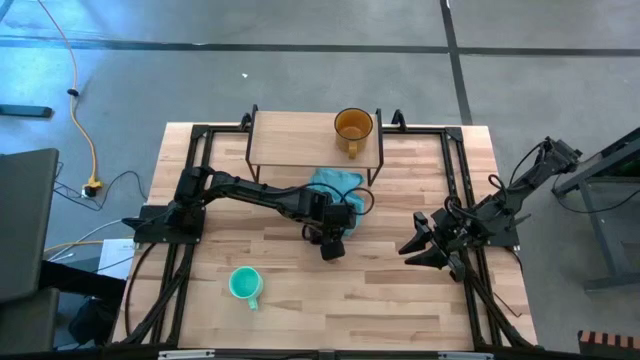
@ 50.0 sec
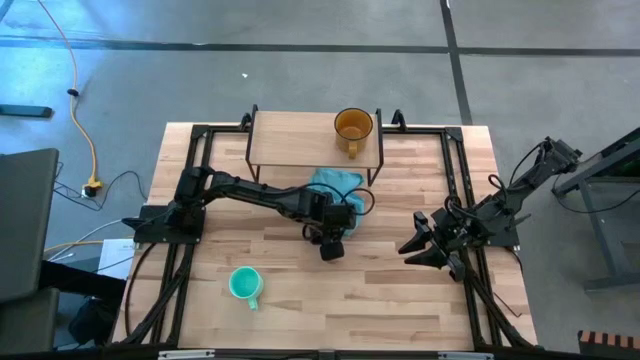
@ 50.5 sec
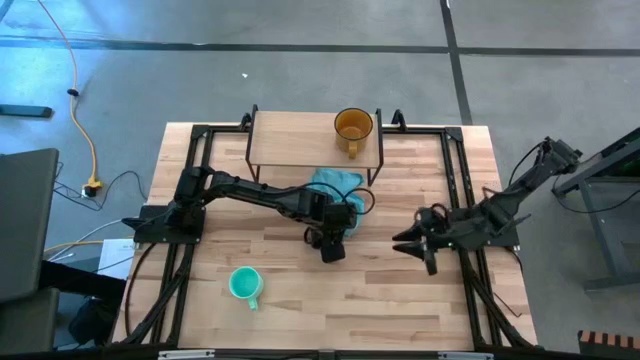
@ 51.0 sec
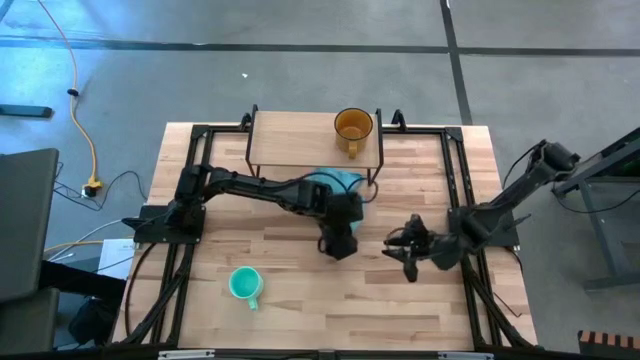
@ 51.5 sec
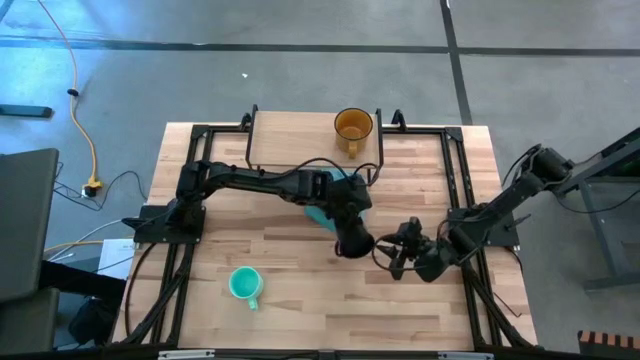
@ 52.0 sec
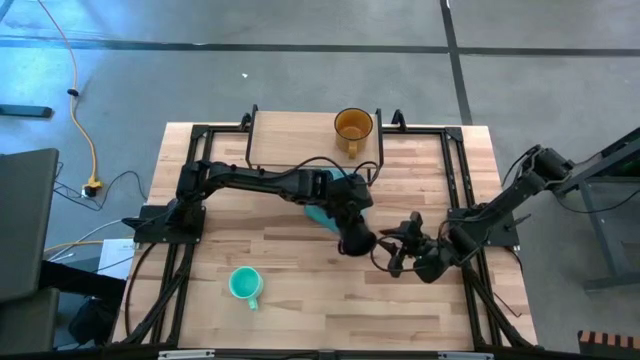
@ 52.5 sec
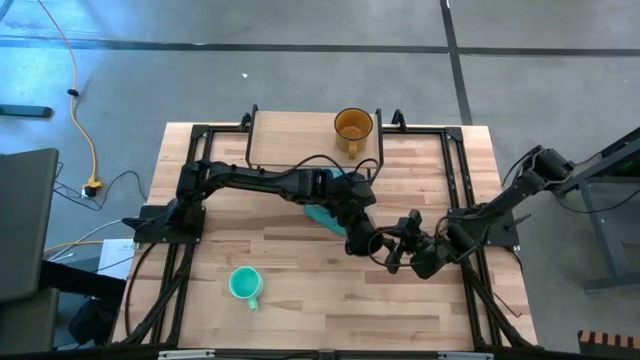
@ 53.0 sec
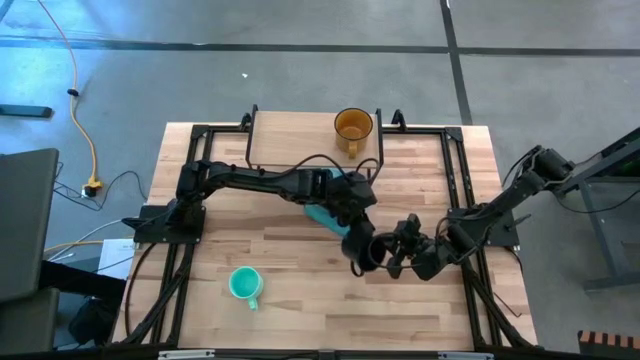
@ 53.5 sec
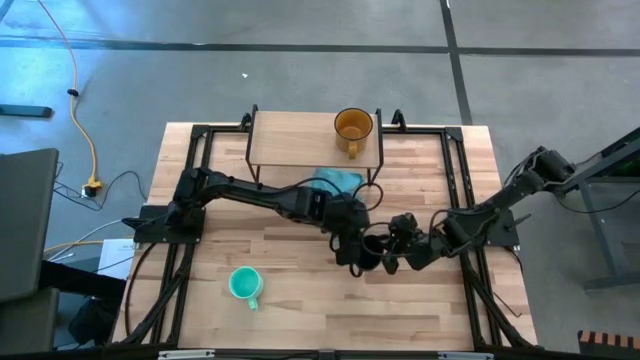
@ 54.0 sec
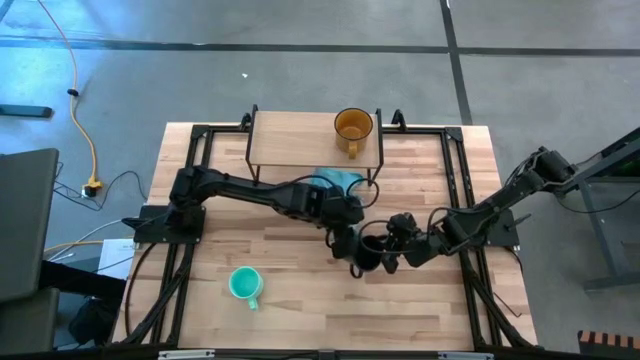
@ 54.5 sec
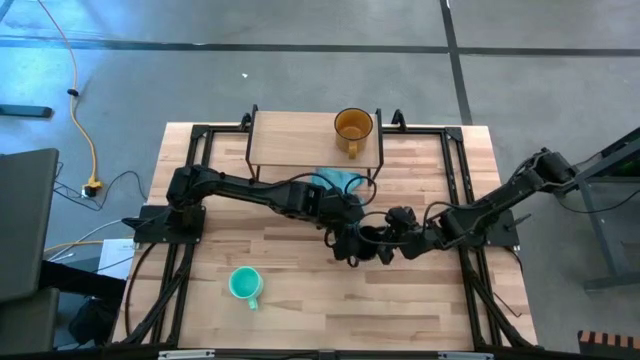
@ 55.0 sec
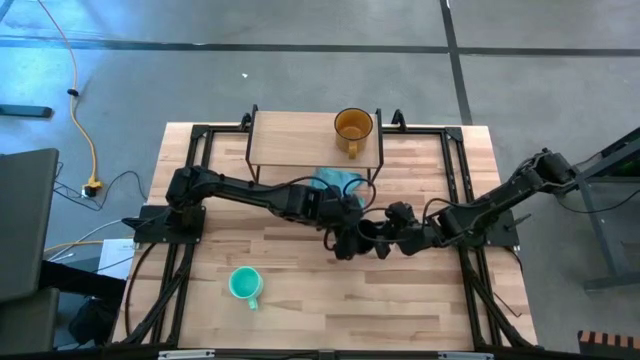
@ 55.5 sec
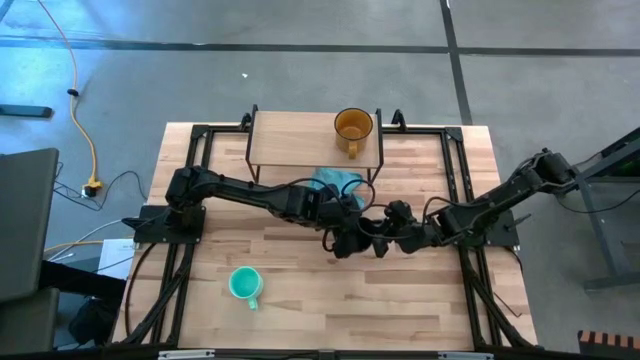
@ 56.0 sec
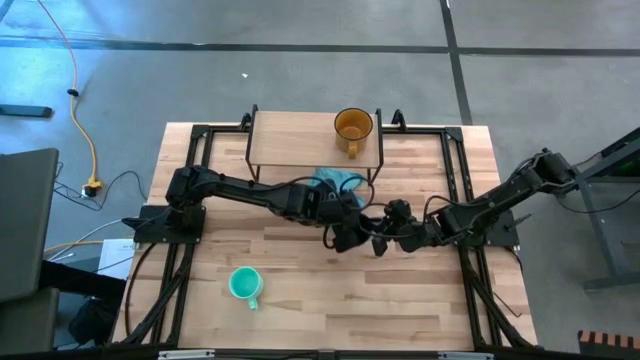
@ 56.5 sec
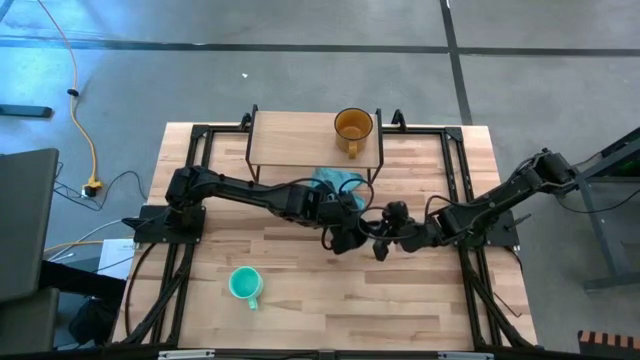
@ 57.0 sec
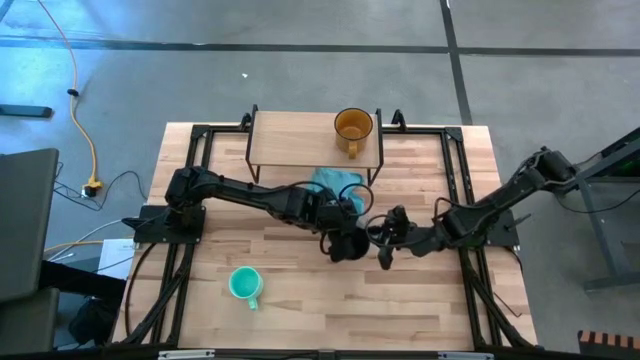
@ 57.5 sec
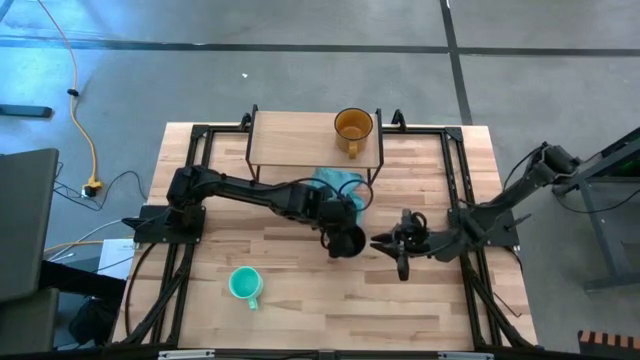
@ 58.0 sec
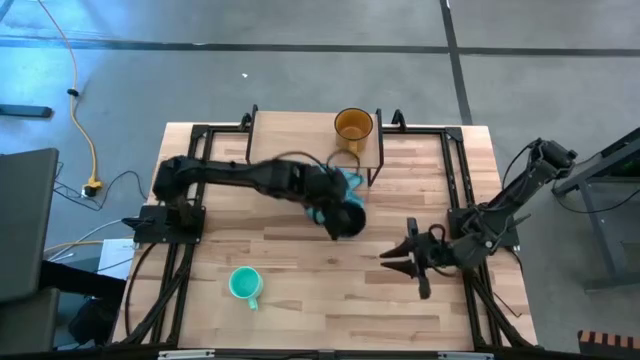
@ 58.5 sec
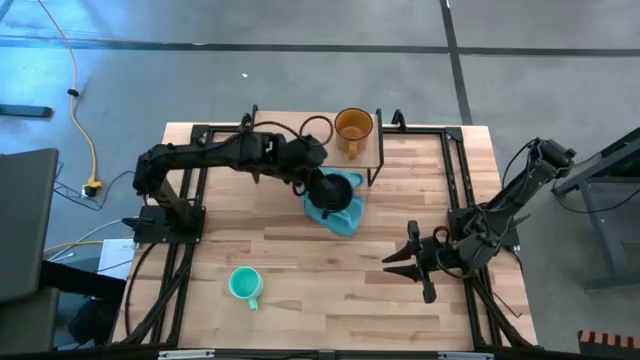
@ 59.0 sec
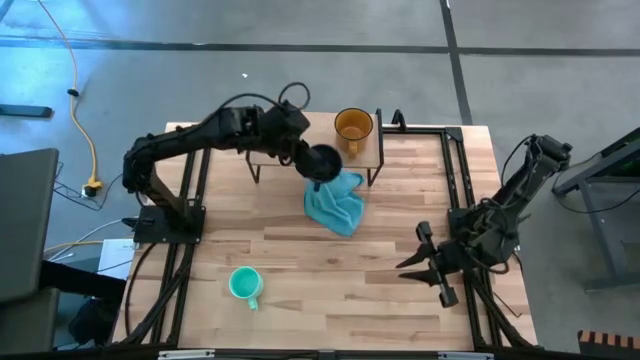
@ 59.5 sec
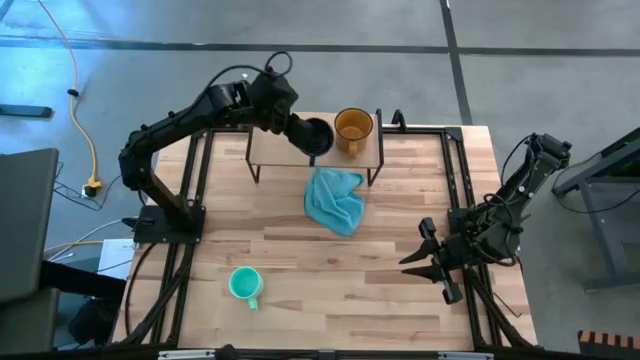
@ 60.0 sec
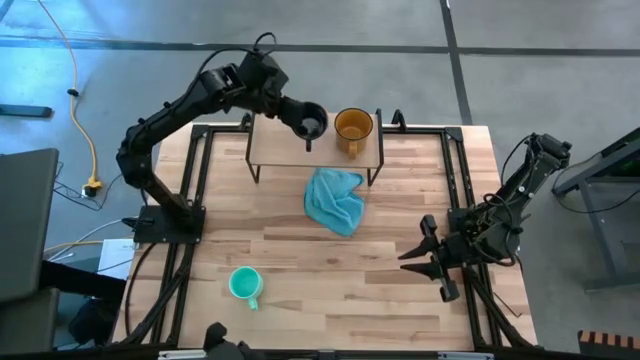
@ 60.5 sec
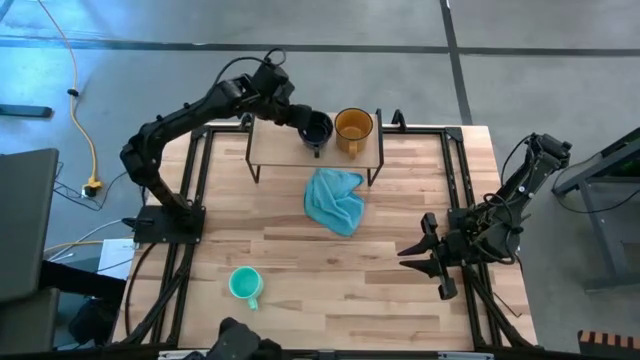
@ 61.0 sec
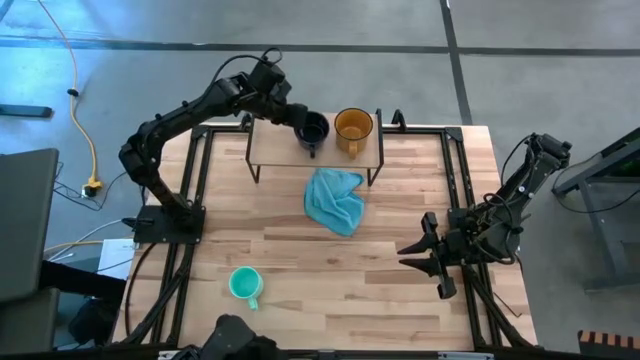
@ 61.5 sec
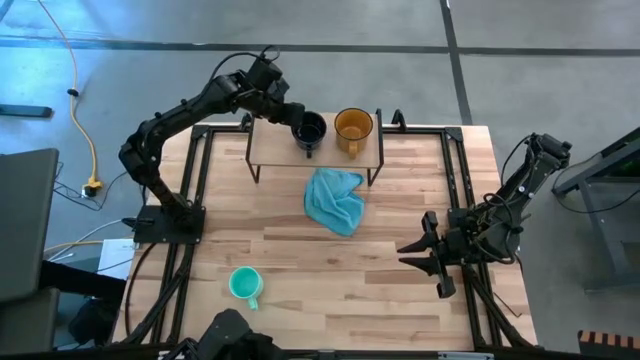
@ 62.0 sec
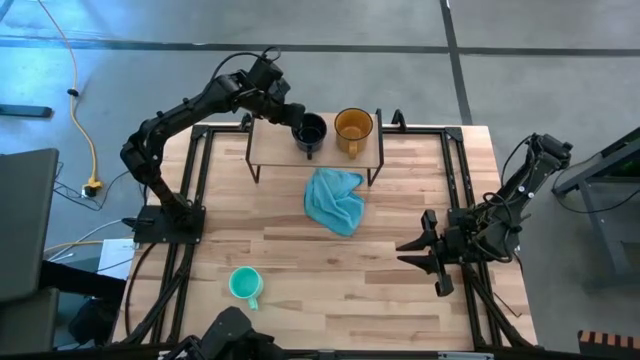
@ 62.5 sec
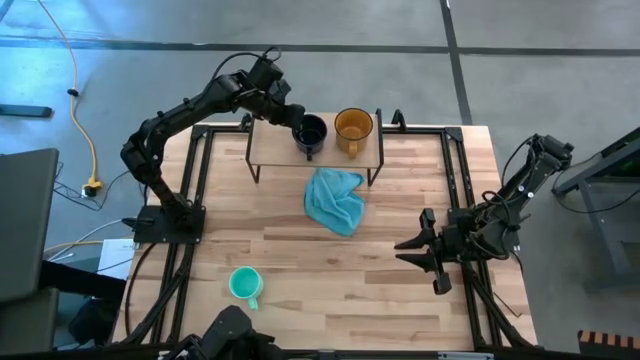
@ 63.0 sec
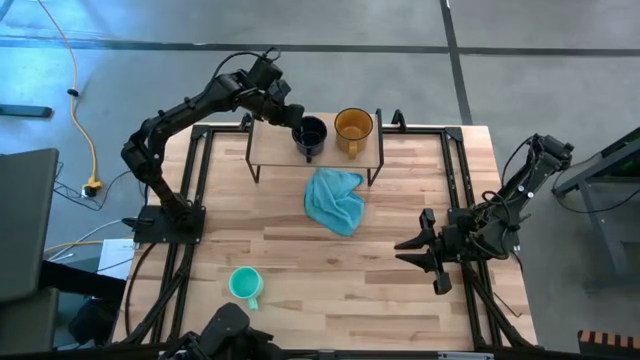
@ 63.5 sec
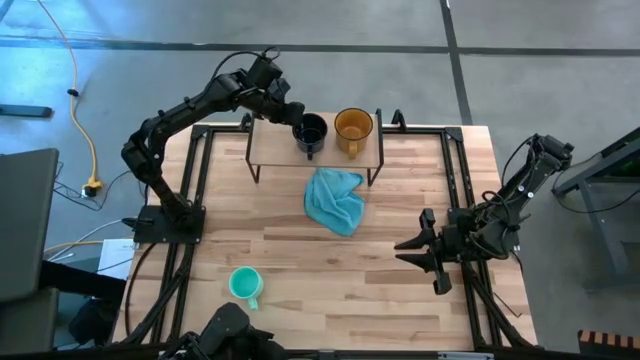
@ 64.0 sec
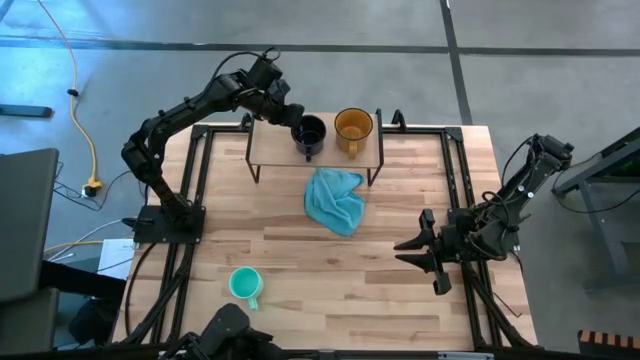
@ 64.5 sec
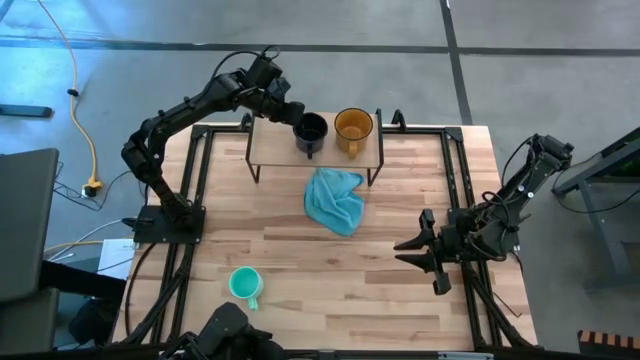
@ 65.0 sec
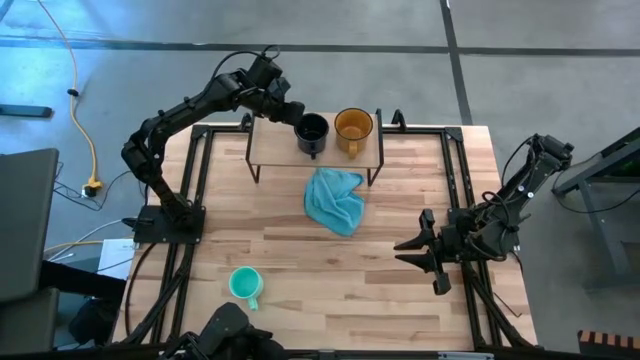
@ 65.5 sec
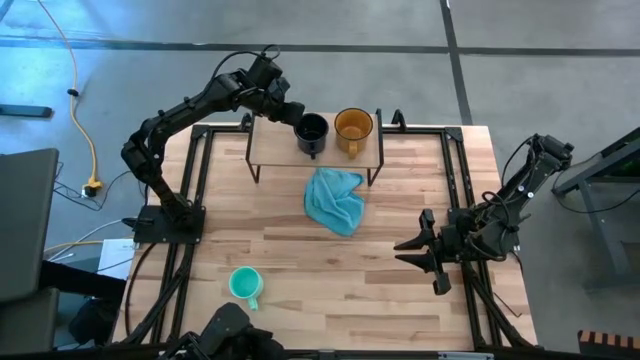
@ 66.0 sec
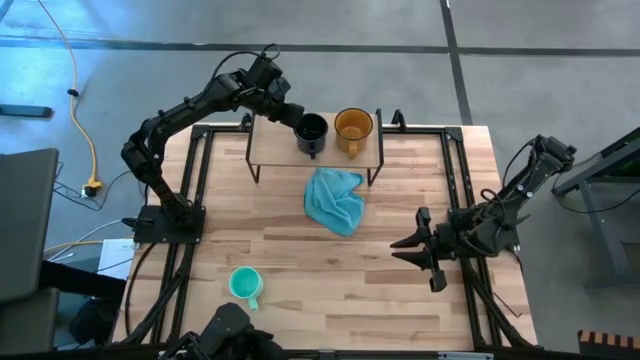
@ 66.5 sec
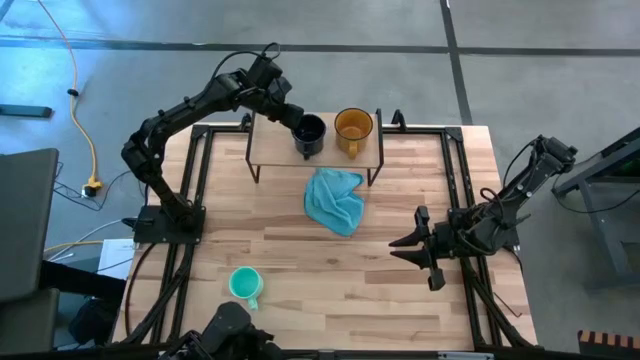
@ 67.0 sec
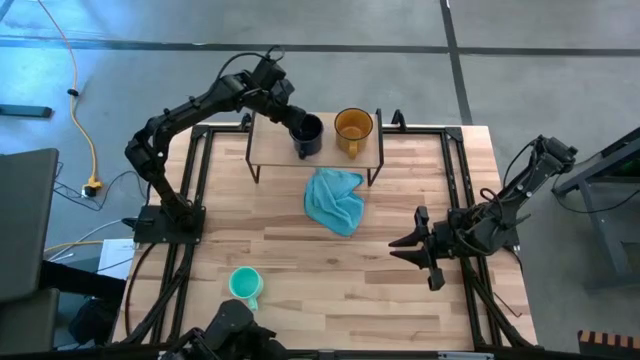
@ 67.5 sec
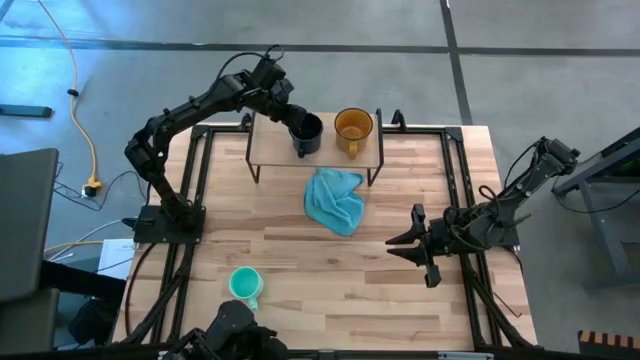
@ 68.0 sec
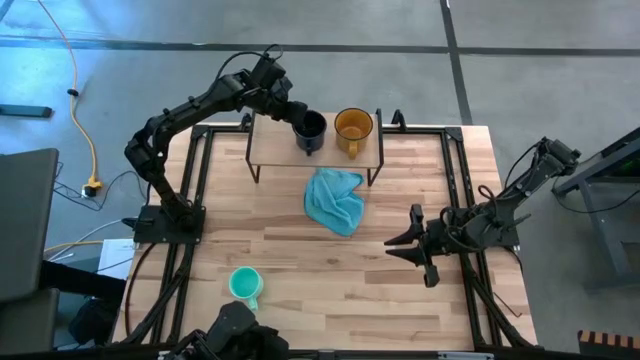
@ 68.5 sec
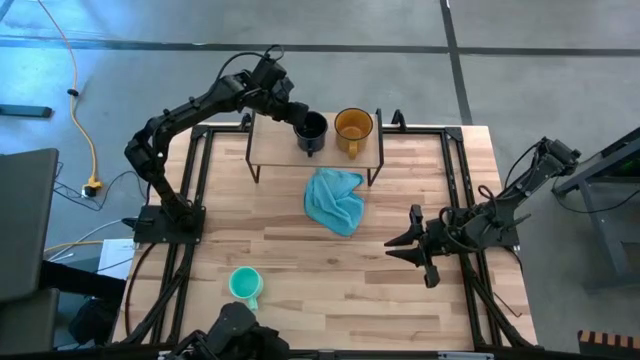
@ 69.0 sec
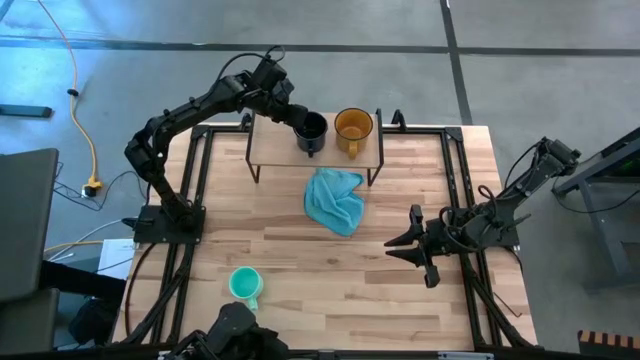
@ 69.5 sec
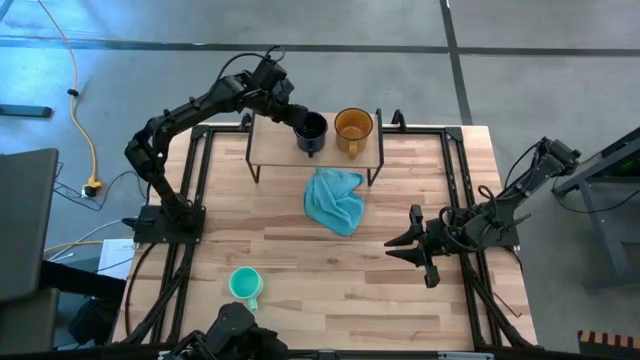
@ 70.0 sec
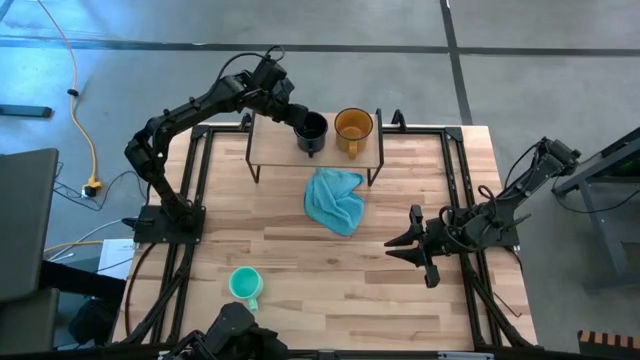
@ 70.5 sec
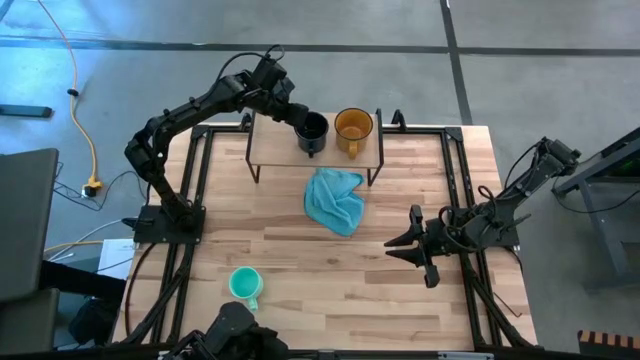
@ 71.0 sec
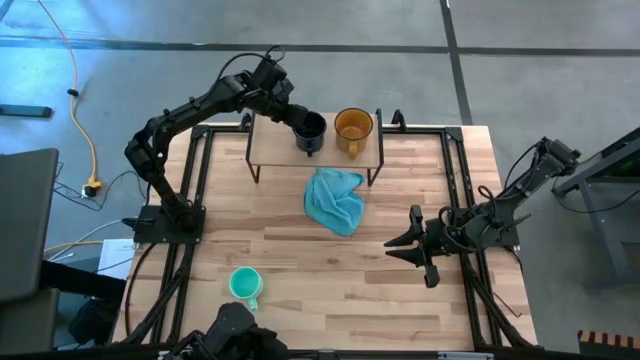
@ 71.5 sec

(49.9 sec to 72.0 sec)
Task: Stack small to large cups/mugs on shelf
Put the dark blue mug on the shelf
